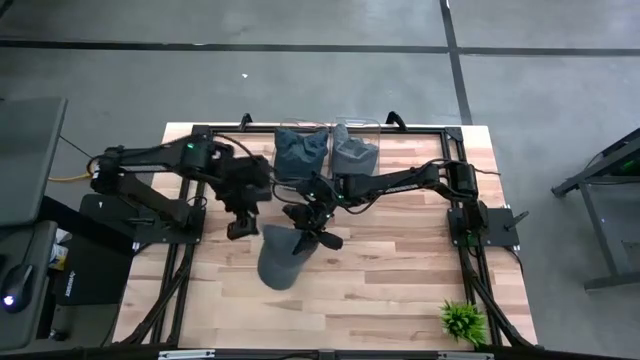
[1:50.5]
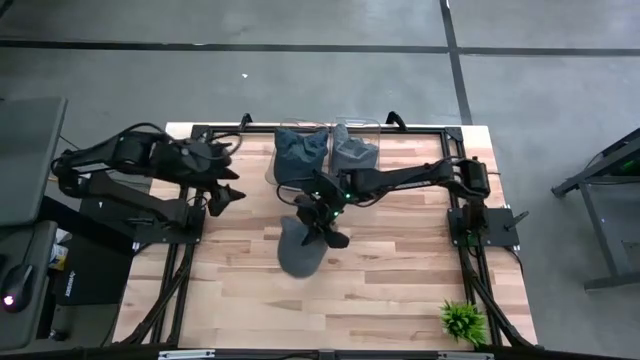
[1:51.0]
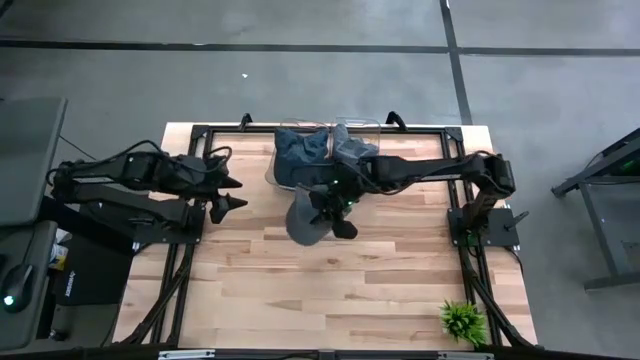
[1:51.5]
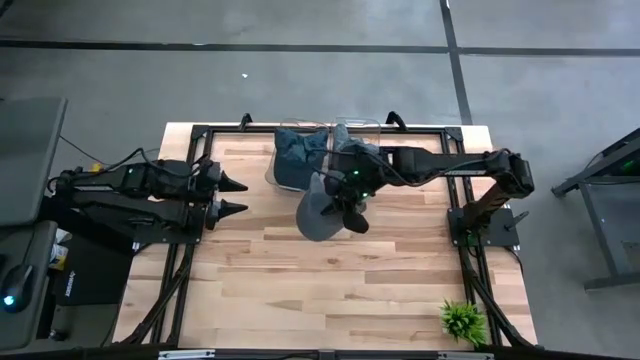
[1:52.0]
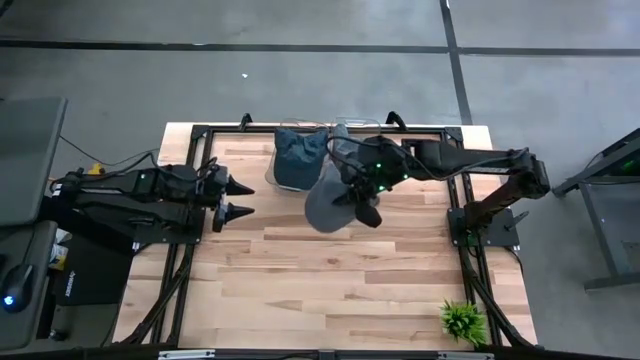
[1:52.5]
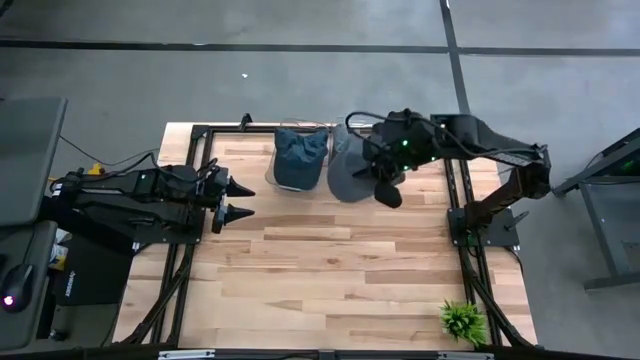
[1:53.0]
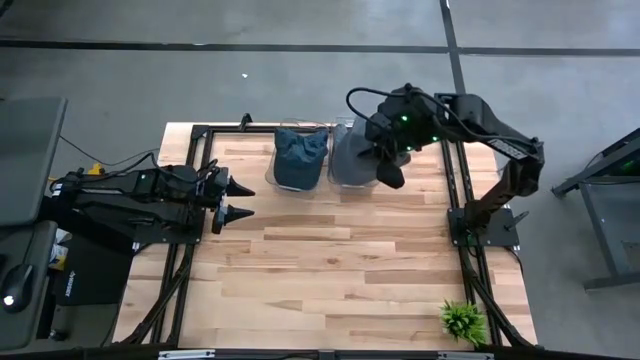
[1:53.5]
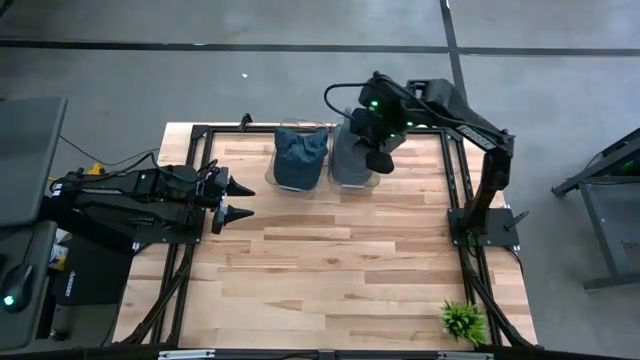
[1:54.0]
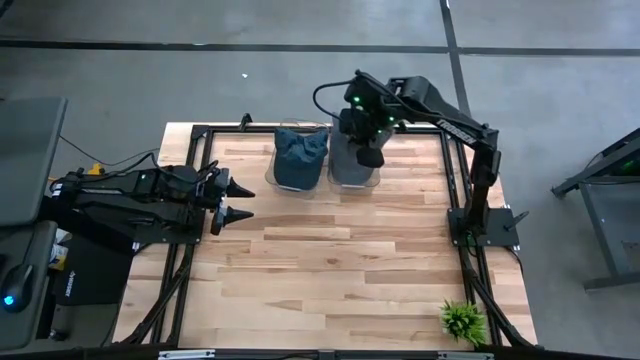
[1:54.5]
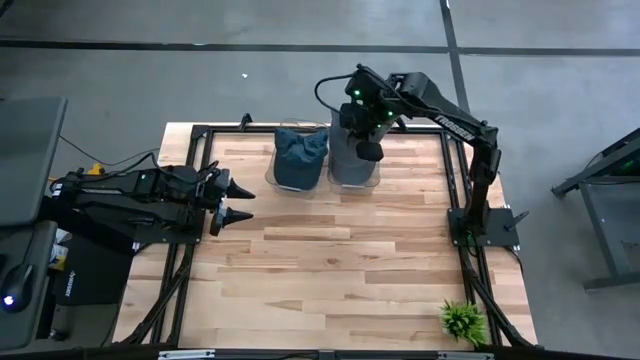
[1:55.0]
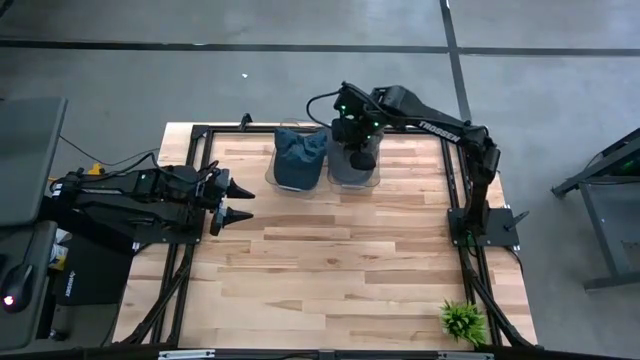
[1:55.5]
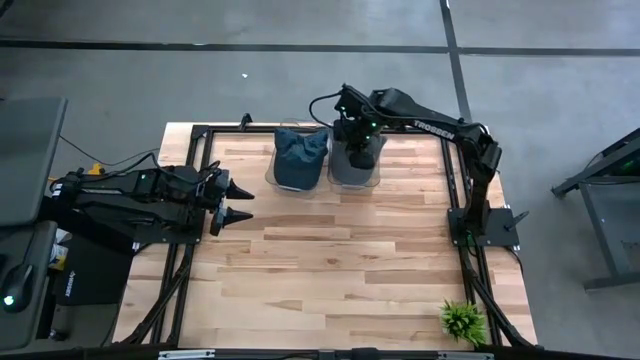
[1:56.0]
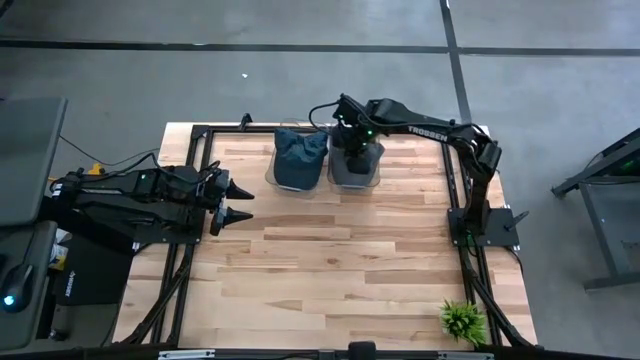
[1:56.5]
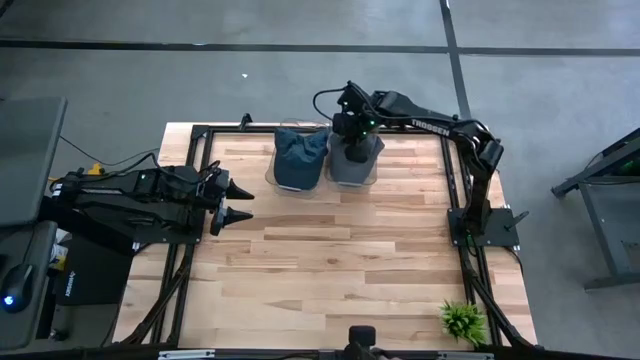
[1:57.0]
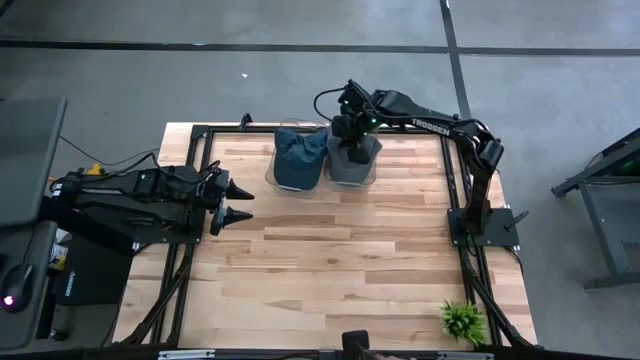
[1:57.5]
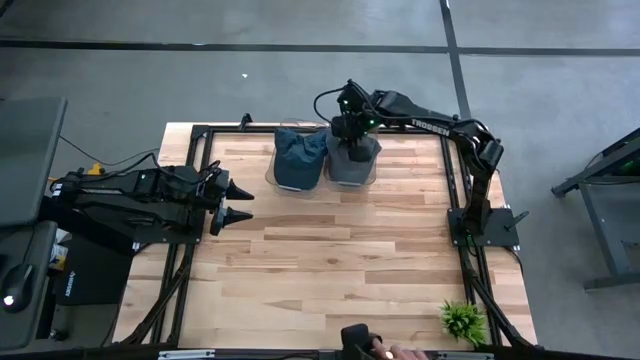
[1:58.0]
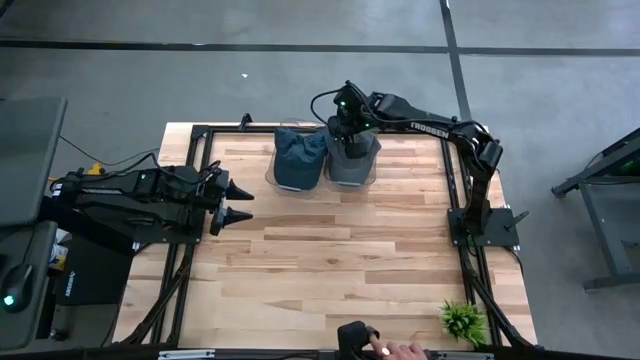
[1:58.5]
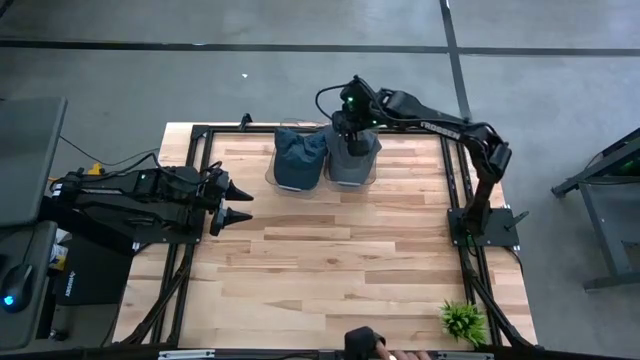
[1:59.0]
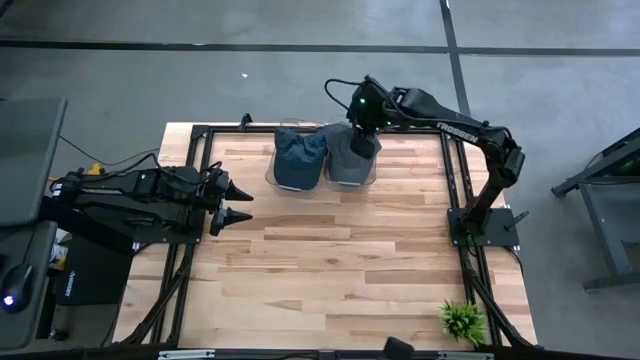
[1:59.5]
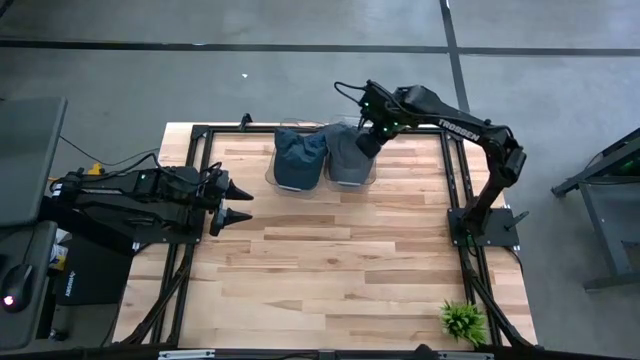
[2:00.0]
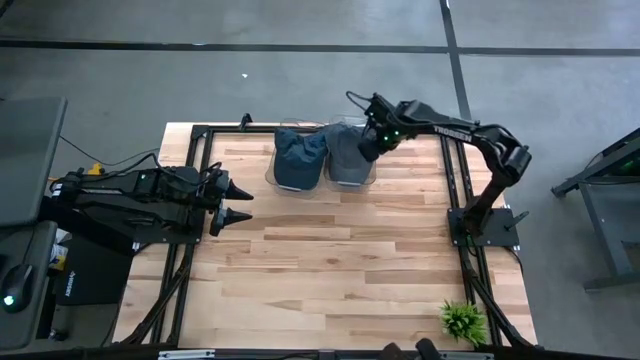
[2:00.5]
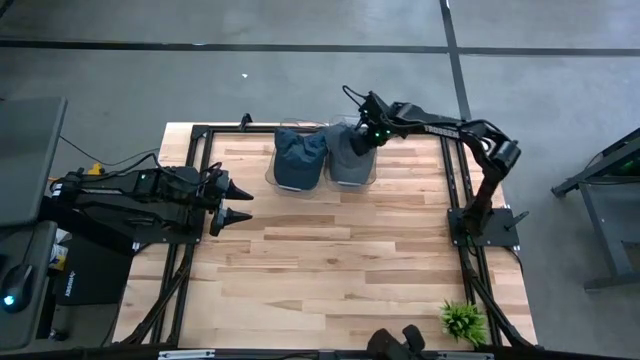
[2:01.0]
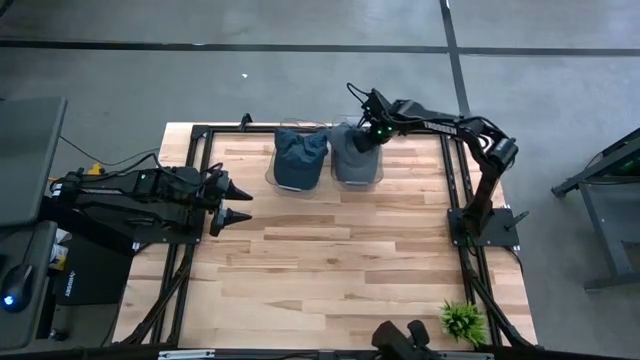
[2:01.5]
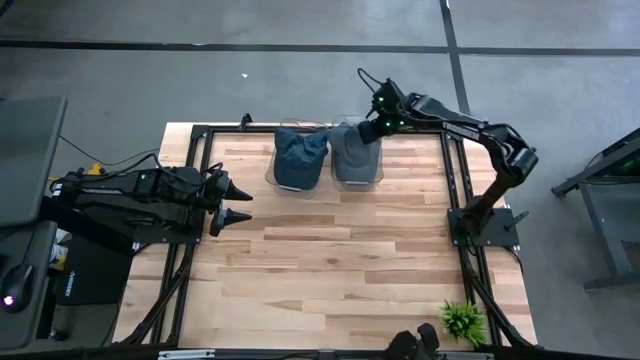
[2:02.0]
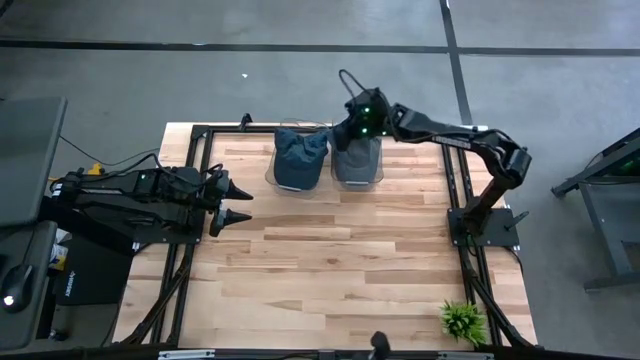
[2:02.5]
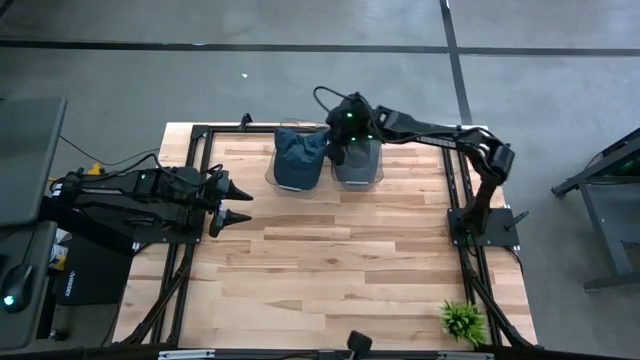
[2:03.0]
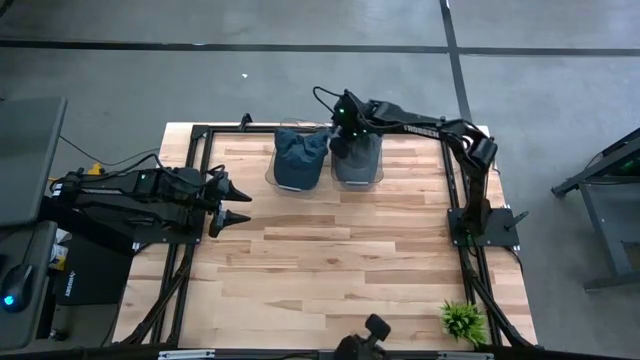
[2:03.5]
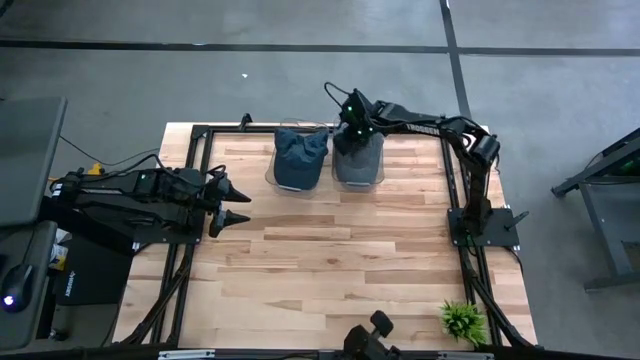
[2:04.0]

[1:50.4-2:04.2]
Task: Pick & Place hat
Put the gray cap into the right transparent bin

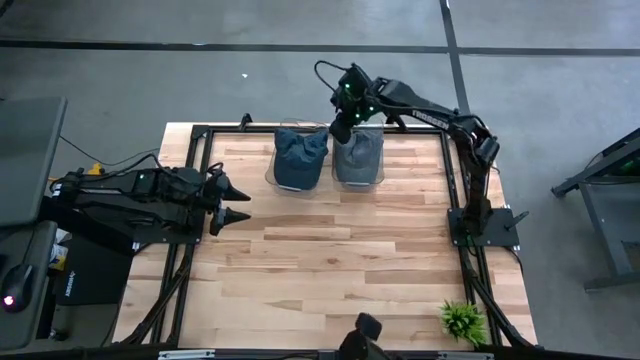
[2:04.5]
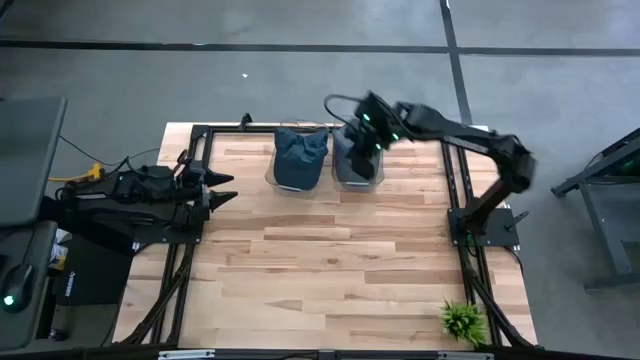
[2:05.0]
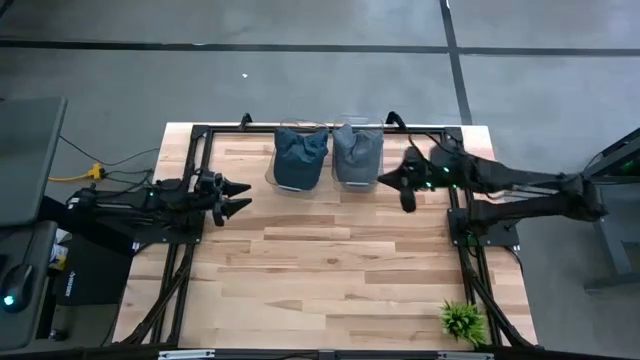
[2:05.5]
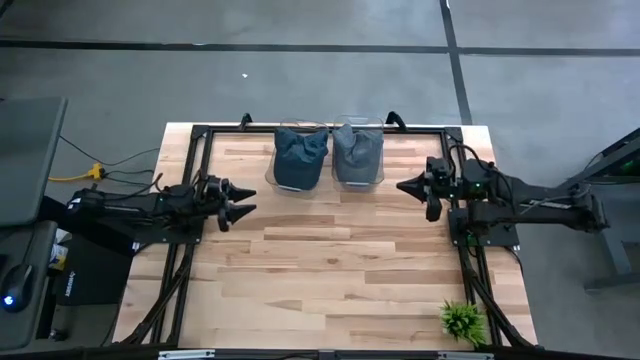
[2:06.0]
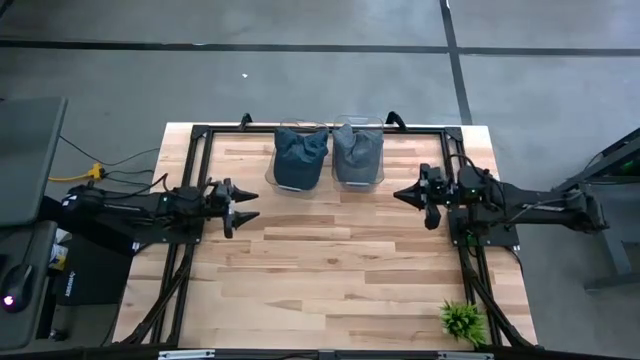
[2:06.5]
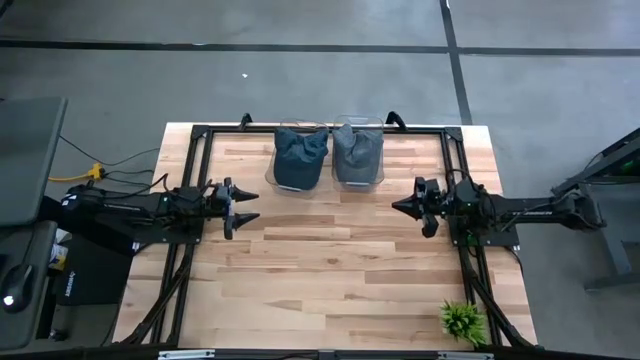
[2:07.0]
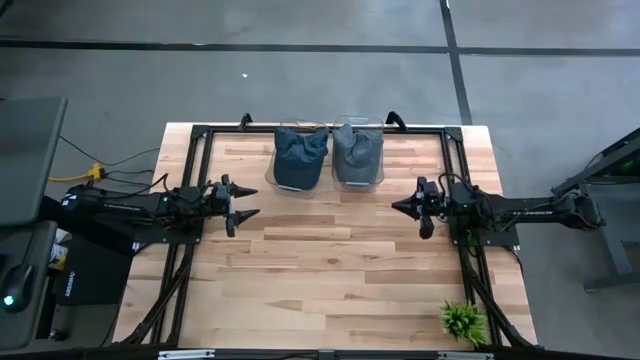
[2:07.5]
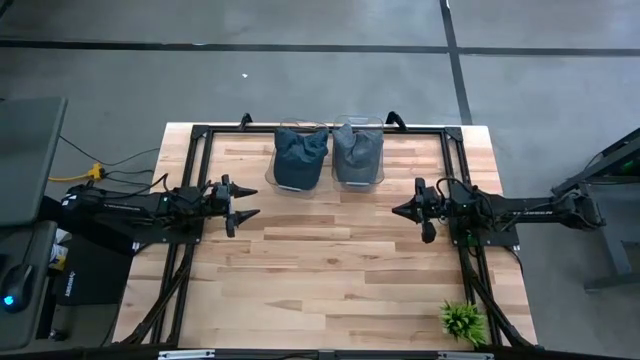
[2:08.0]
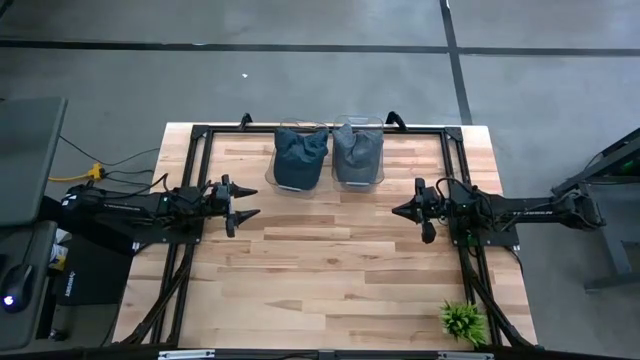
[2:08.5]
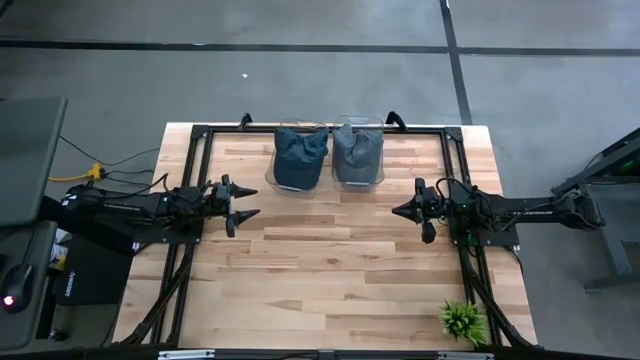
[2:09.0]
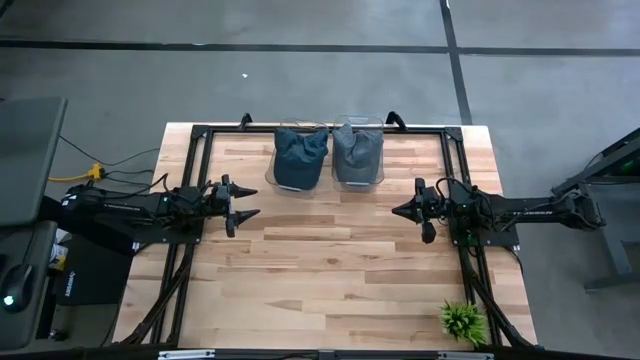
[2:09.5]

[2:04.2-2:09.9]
Return to Home Position

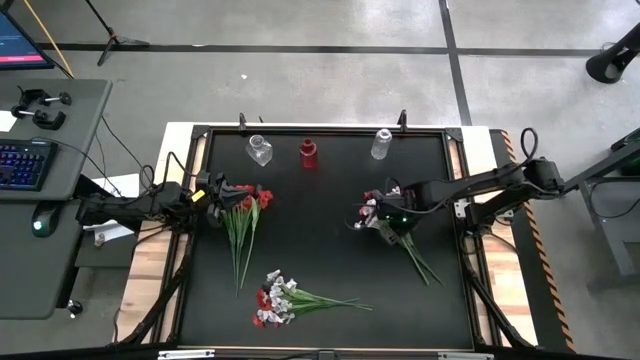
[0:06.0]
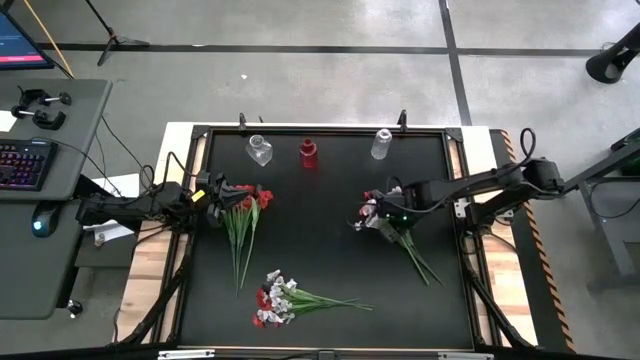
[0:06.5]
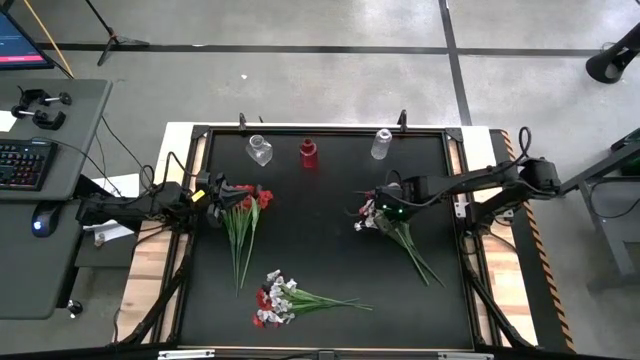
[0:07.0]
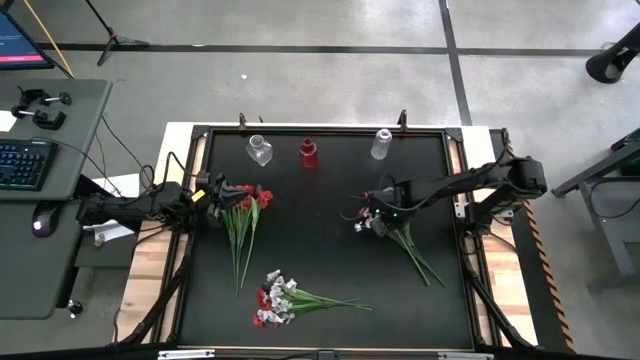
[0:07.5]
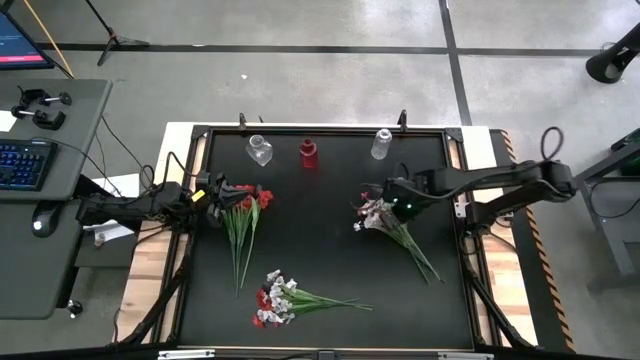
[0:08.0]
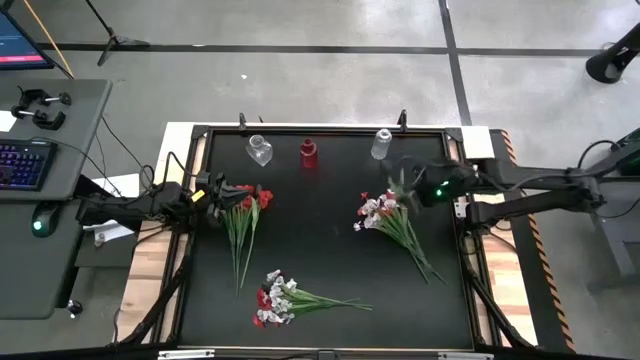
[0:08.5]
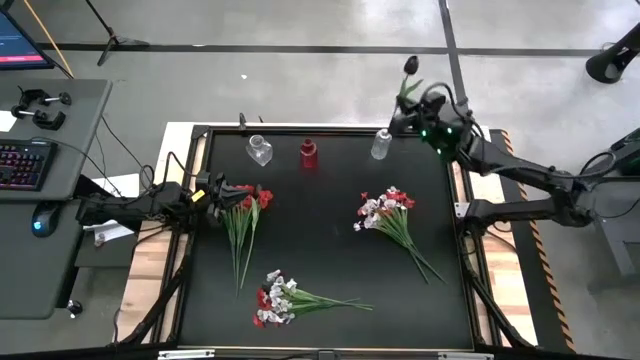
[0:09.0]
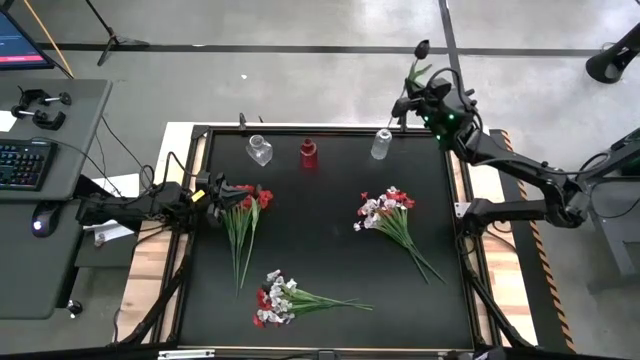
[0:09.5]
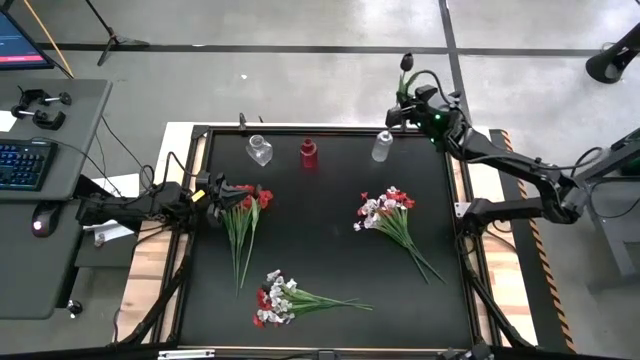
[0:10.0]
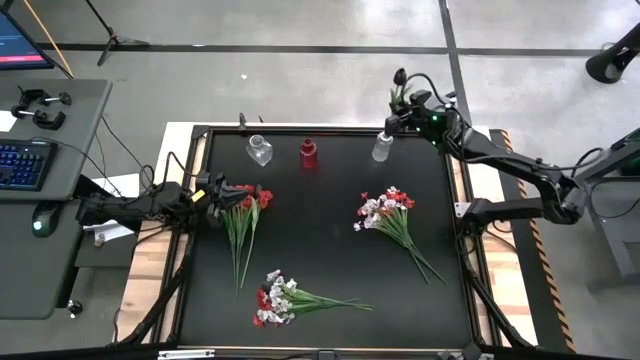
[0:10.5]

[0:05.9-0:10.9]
Task: Sort flowers into vase by color
Put the top right black flower into the right transparent flower vase
